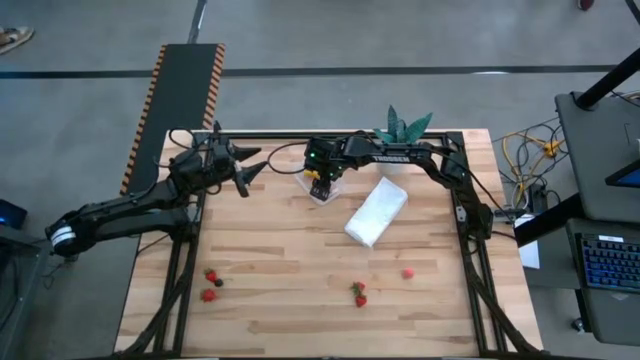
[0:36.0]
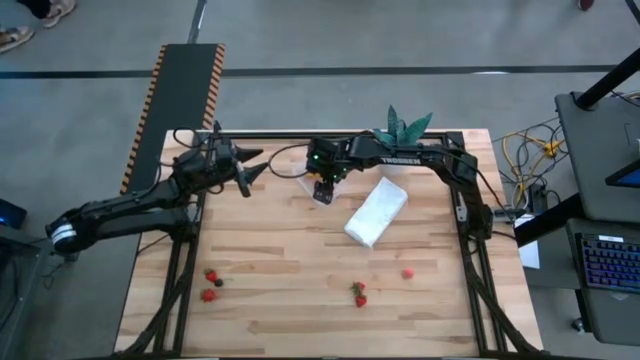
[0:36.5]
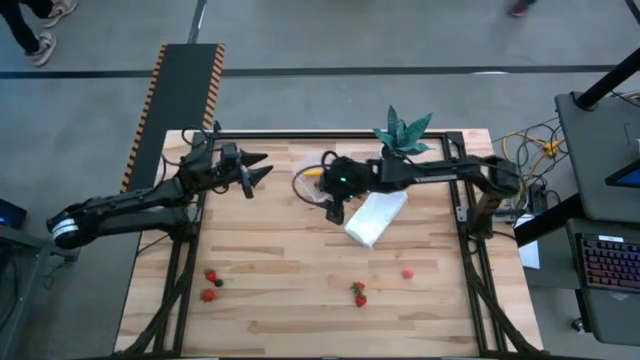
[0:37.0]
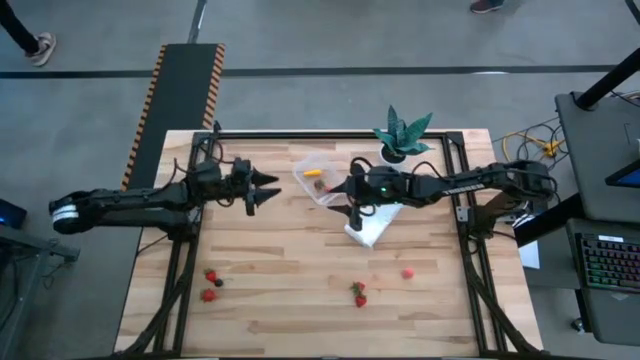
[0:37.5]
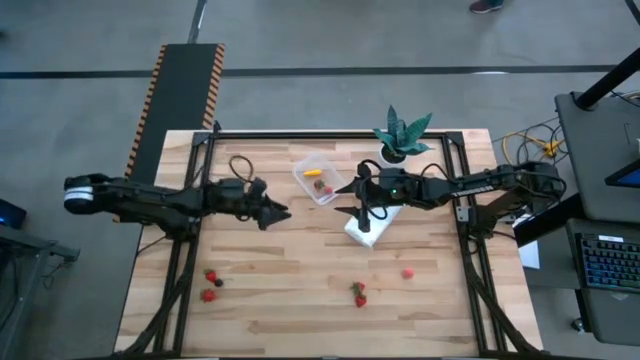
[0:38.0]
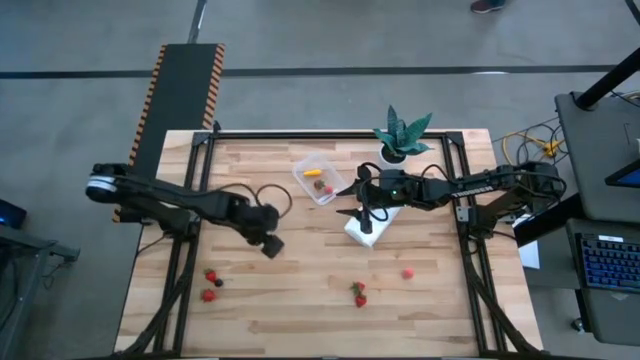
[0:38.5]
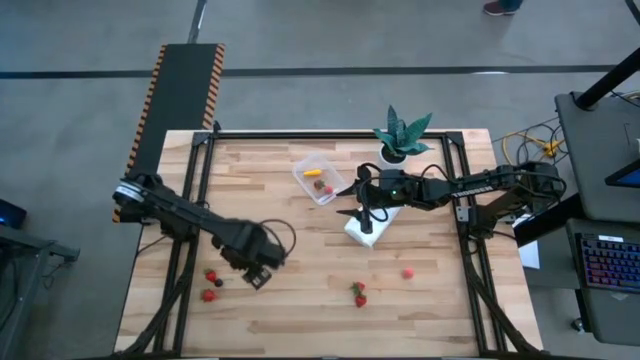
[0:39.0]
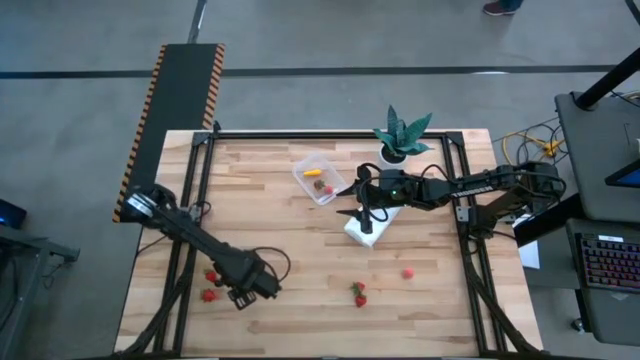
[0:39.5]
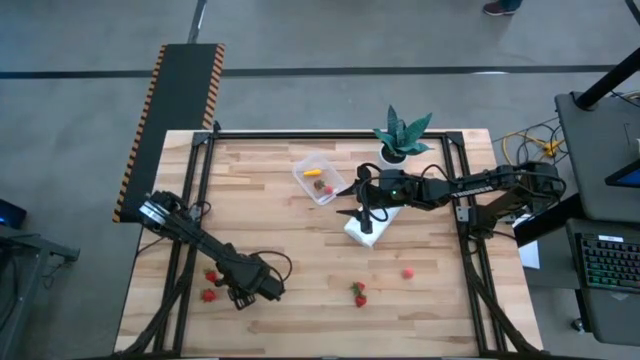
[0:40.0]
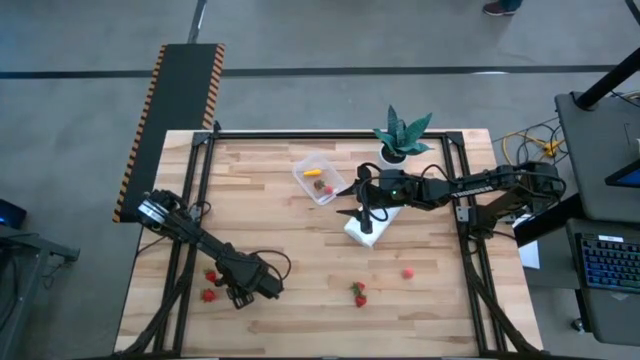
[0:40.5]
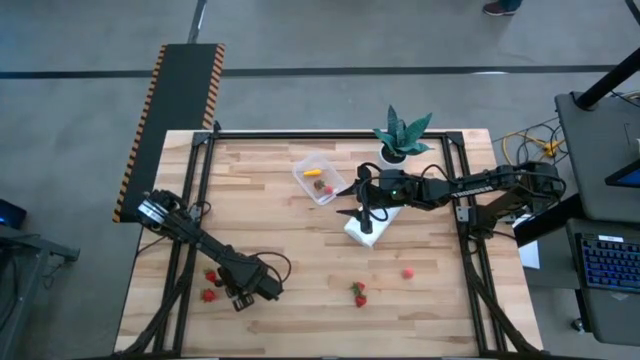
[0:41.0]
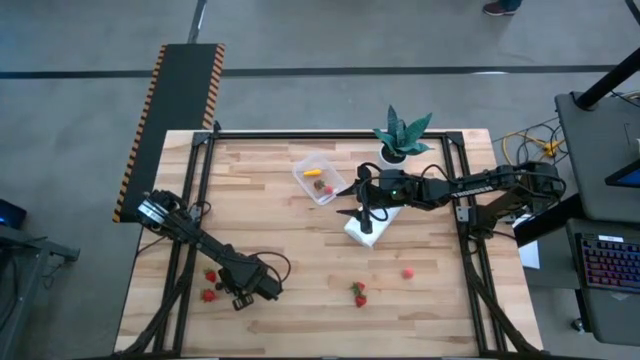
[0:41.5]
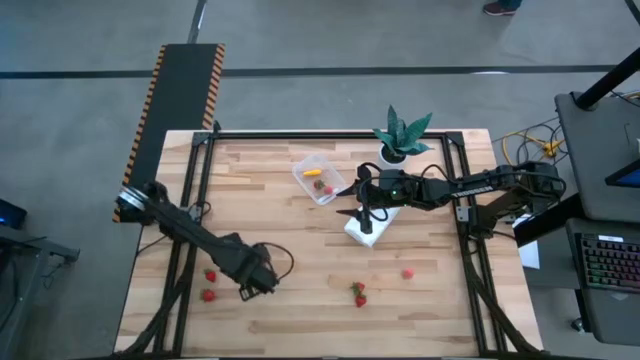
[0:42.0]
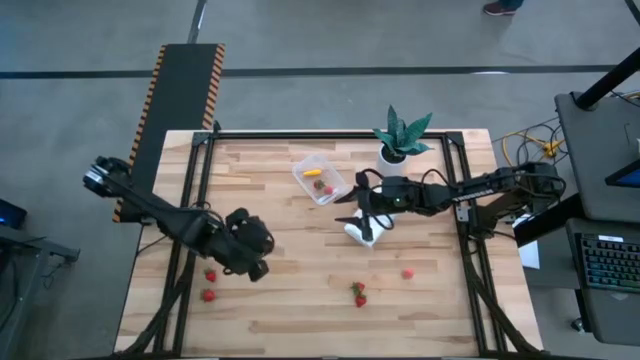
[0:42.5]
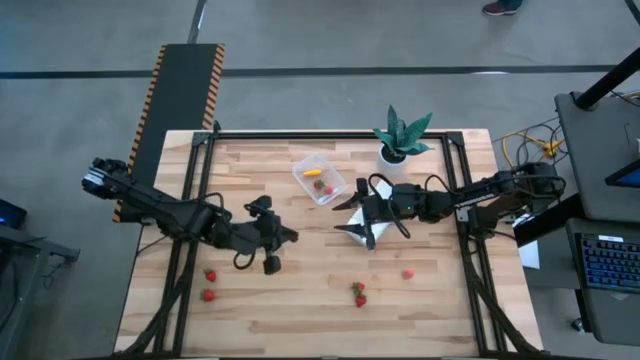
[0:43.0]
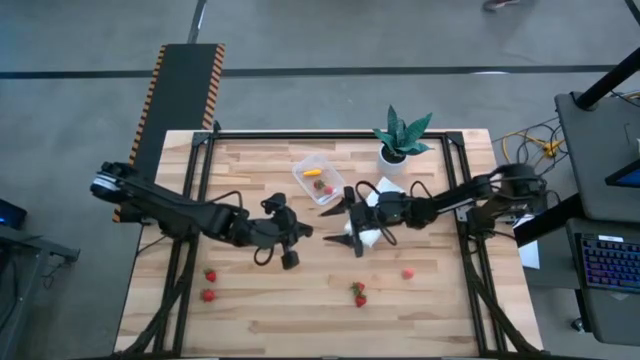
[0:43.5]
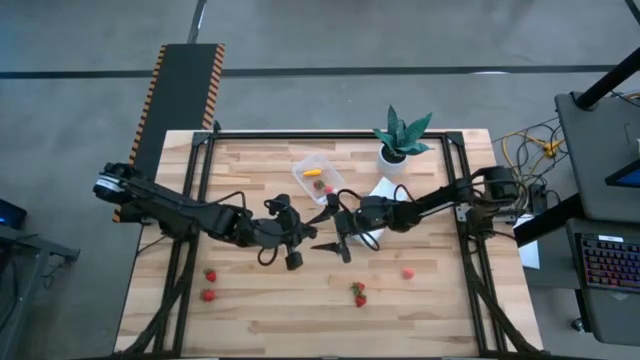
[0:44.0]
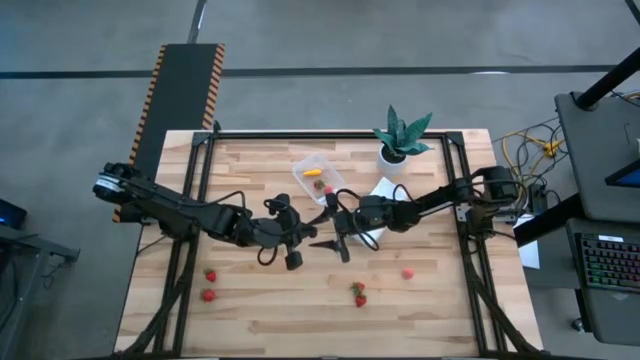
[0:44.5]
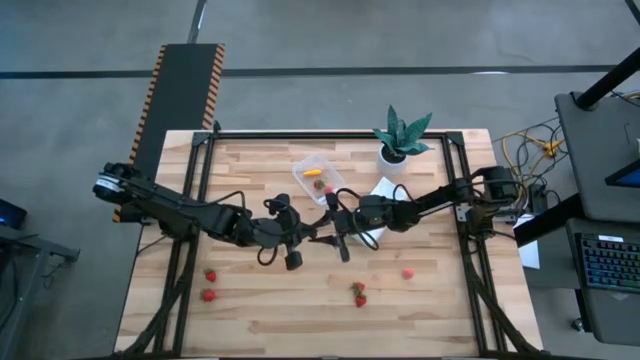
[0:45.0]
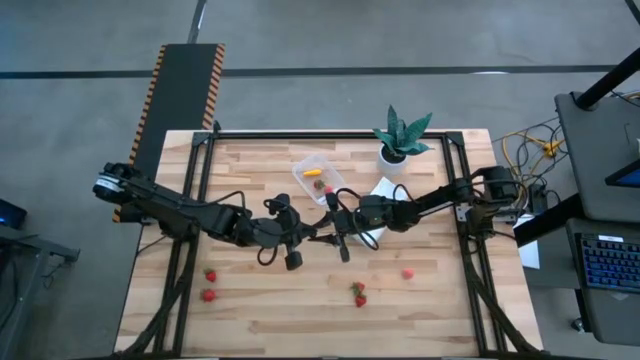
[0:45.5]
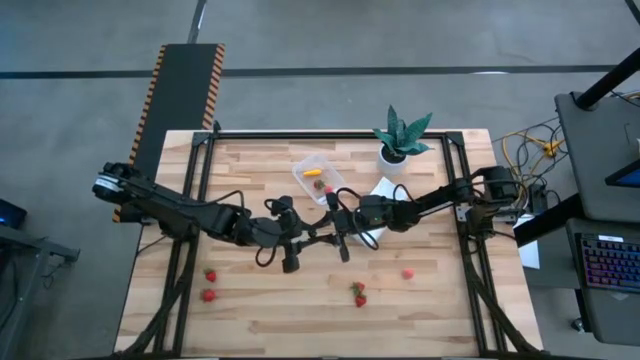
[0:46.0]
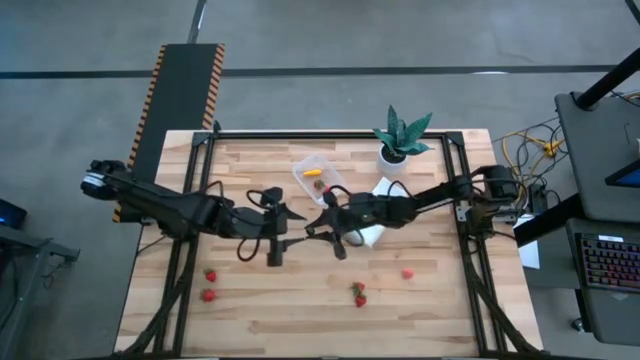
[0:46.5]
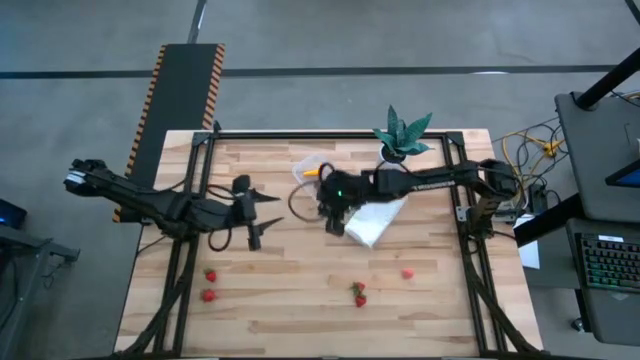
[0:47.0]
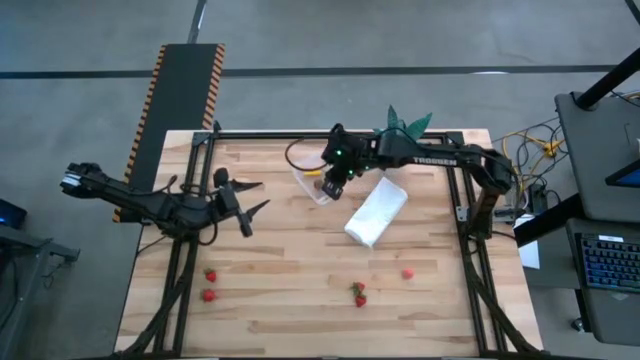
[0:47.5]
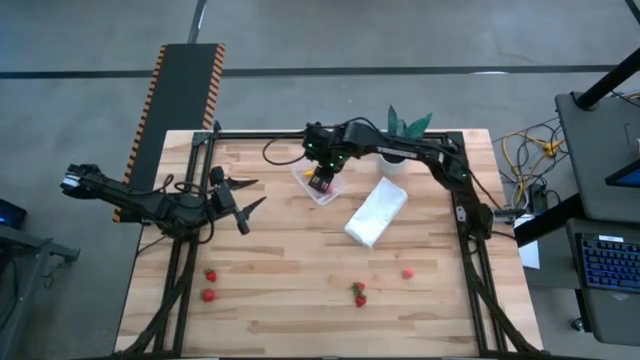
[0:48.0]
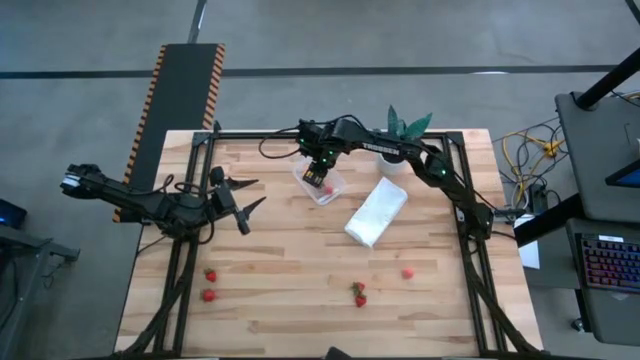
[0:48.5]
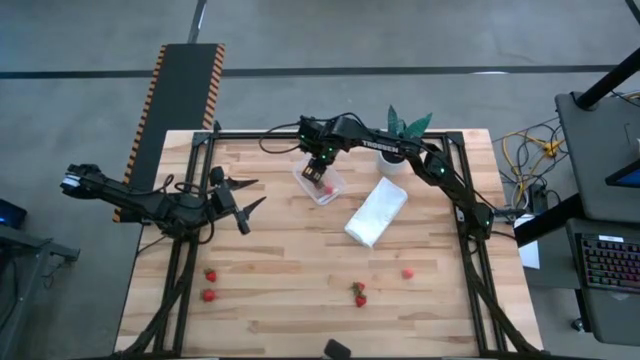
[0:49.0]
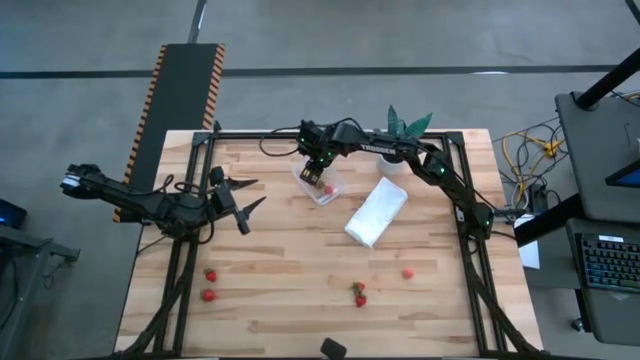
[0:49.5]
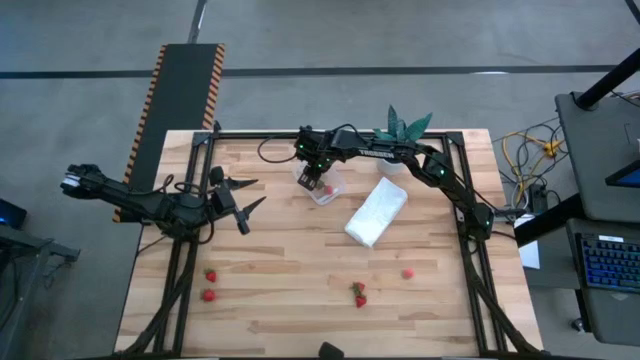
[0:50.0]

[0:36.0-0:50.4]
Task: Pick and placing Produce into tupperware
Put the cherry into the transparent bin

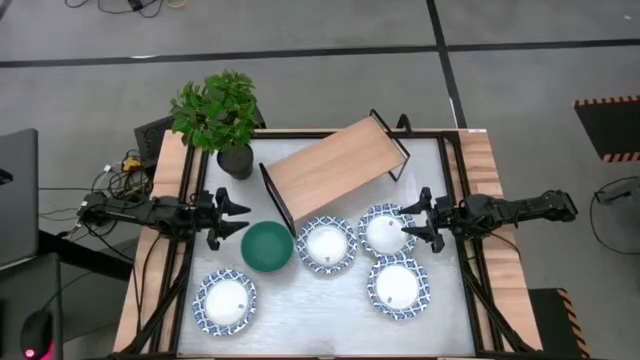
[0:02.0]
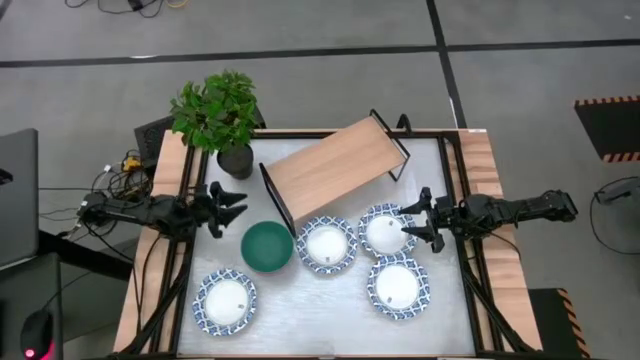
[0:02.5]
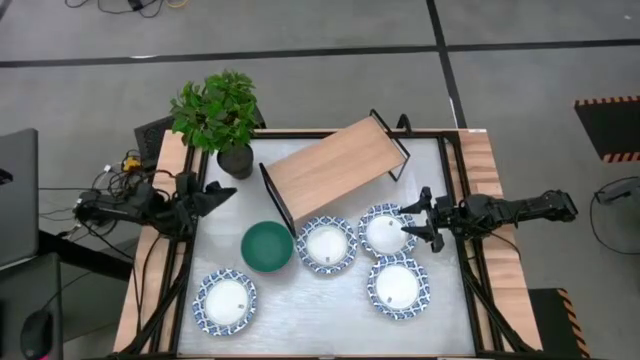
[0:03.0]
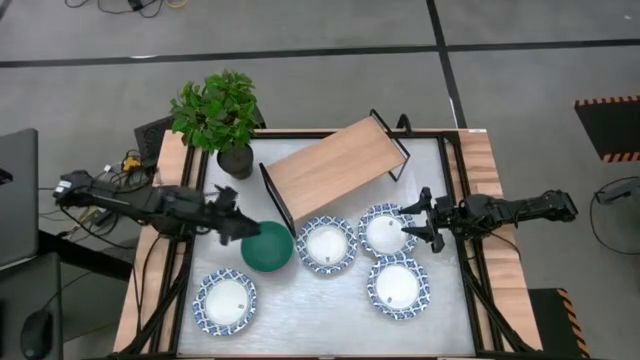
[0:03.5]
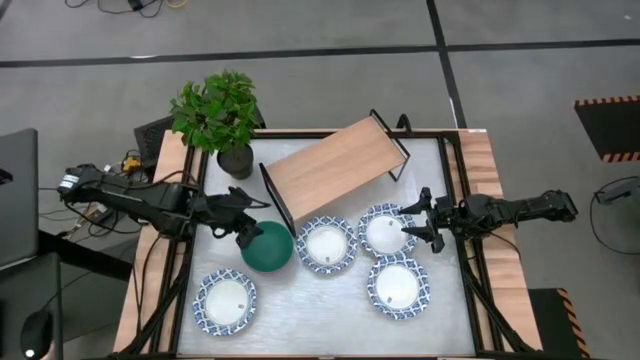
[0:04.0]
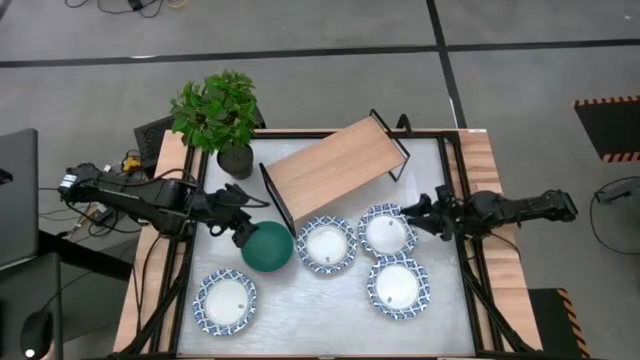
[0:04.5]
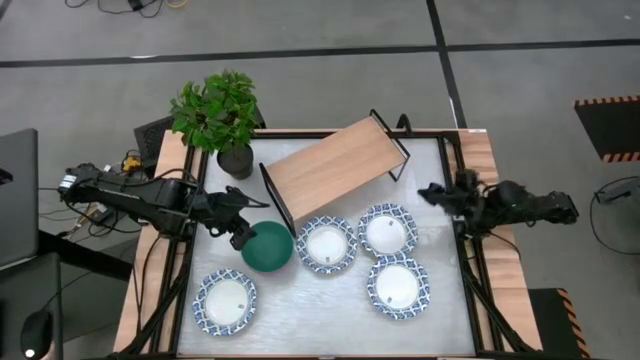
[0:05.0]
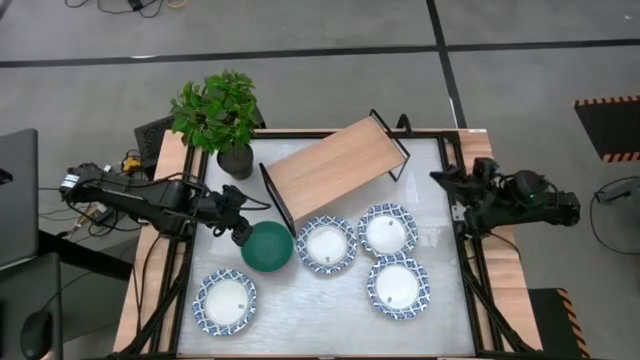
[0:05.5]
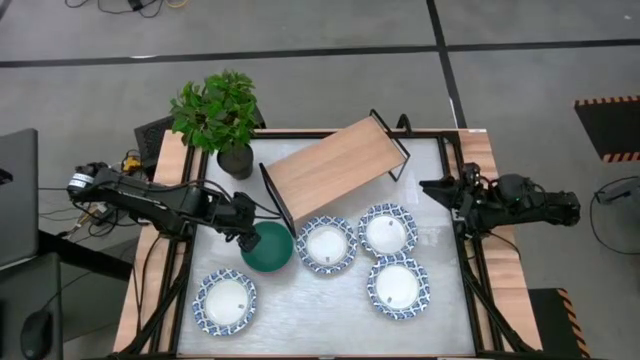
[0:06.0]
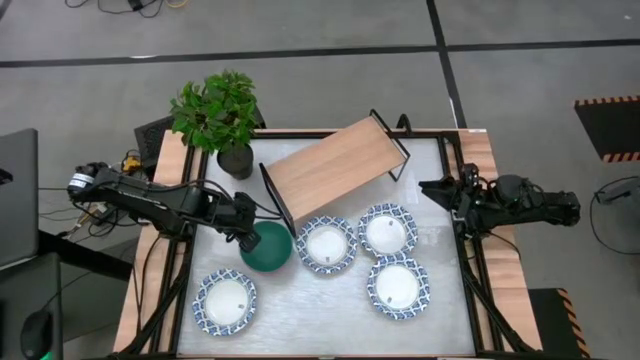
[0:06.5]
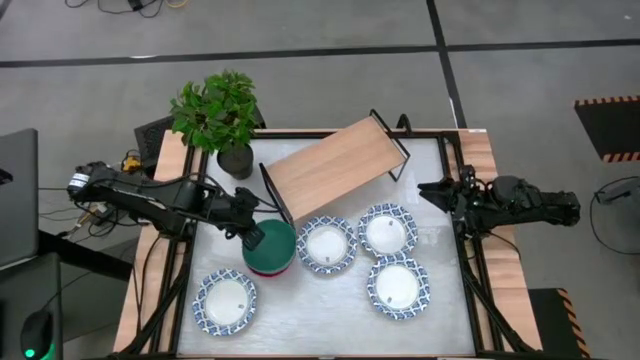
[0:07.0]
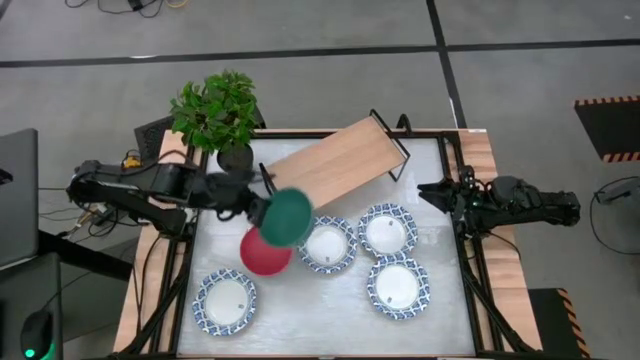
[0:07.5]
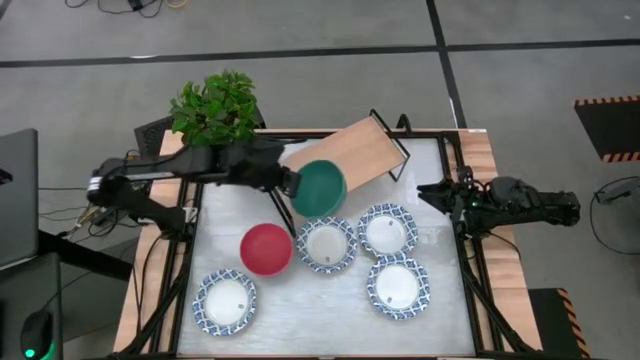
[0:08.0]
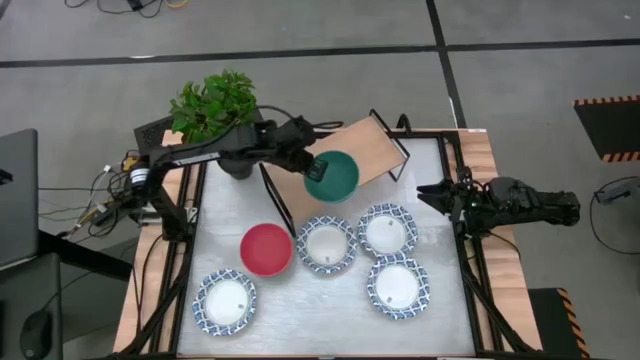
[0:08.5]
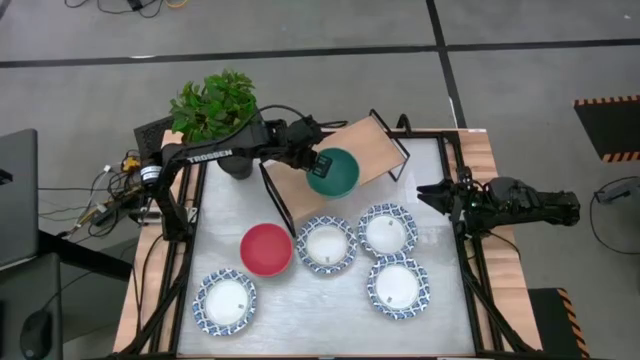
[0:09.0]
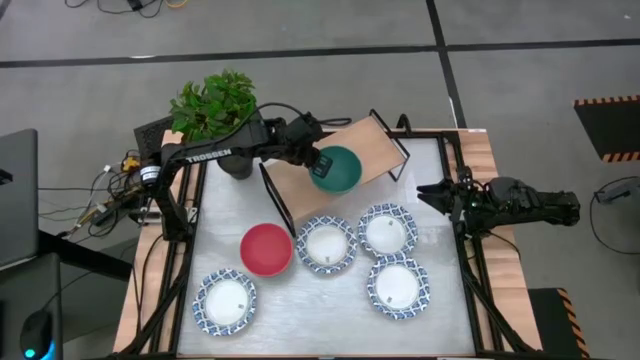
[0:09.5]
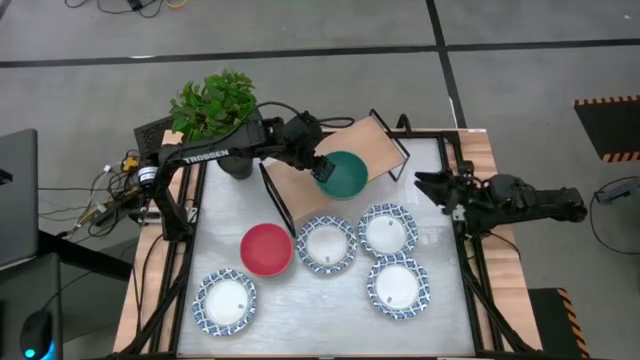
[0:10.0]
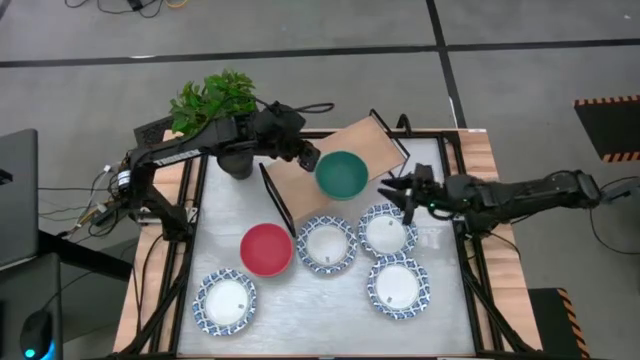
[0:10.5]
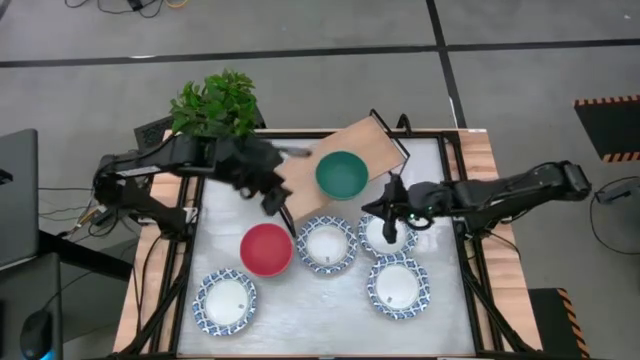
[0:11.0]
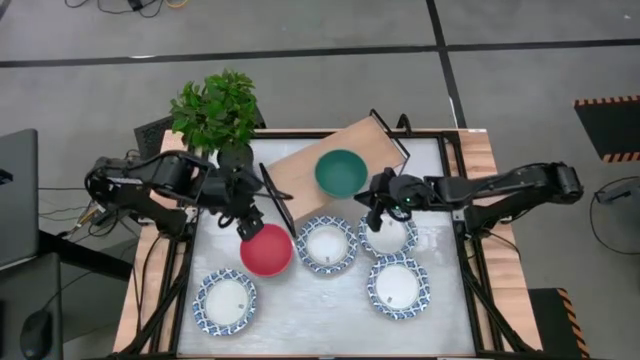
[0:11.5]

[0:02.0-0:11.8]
Task: Place and stack bowls onto a shelf
Put the green bowl on the shelf
